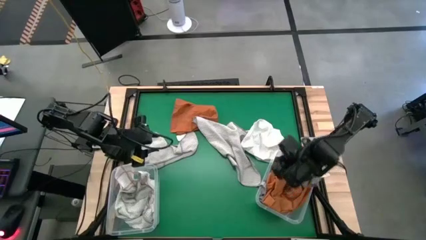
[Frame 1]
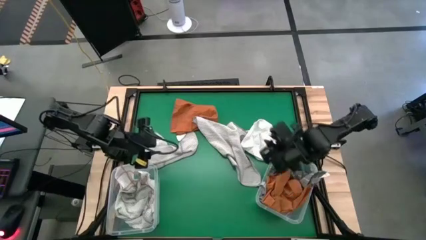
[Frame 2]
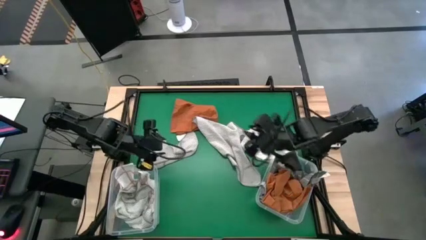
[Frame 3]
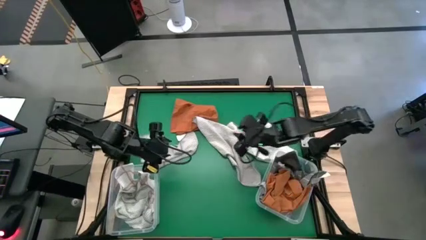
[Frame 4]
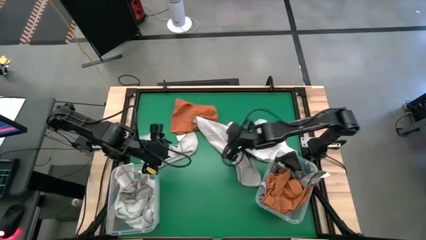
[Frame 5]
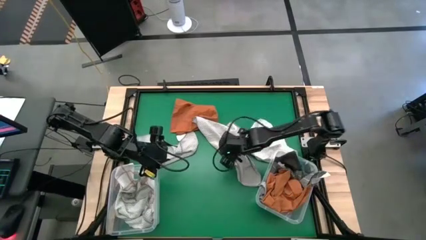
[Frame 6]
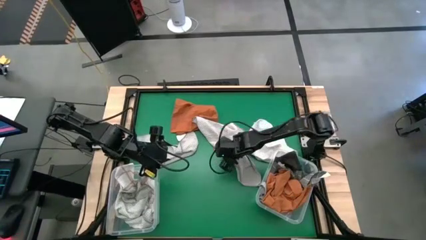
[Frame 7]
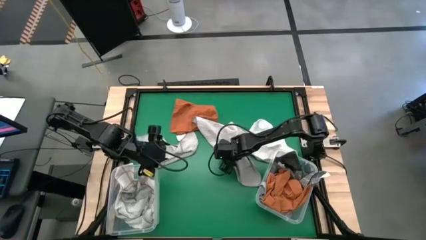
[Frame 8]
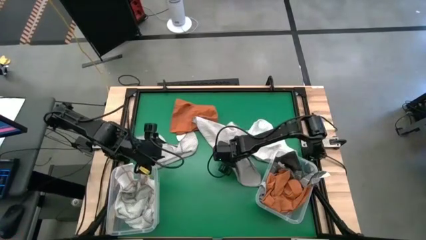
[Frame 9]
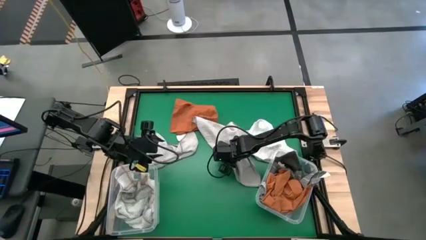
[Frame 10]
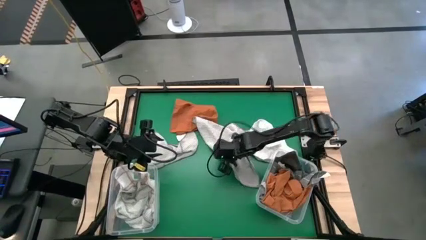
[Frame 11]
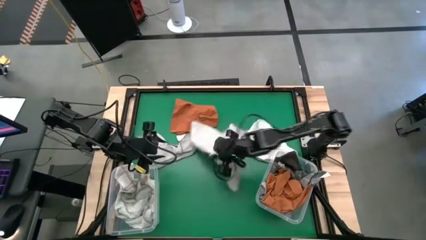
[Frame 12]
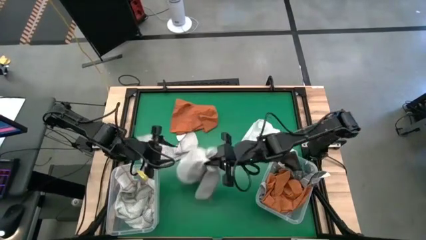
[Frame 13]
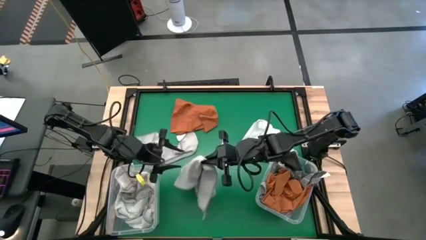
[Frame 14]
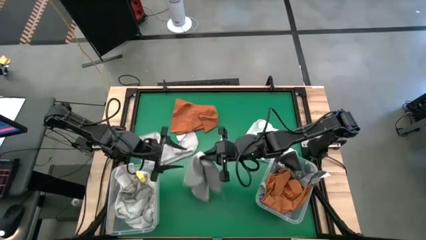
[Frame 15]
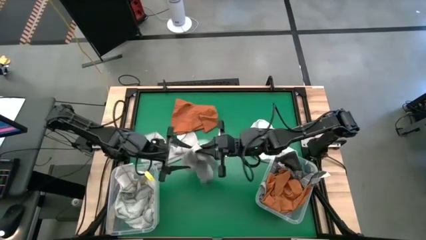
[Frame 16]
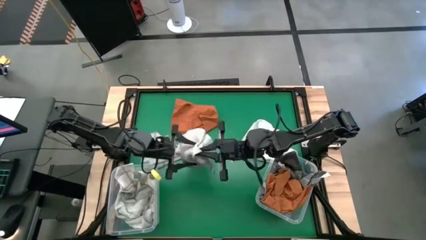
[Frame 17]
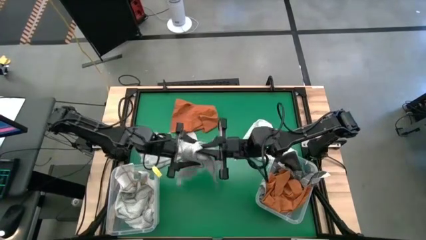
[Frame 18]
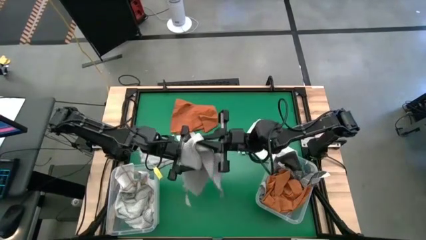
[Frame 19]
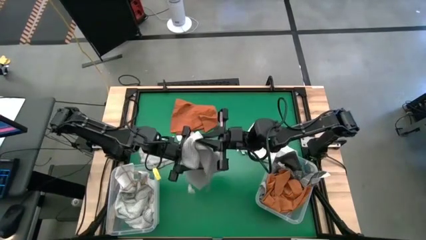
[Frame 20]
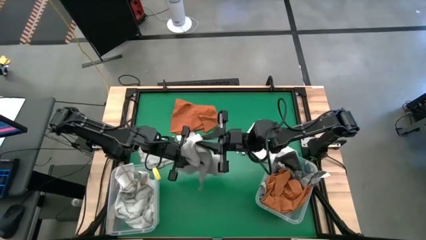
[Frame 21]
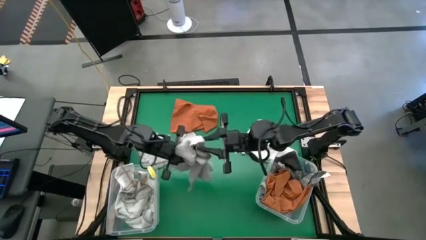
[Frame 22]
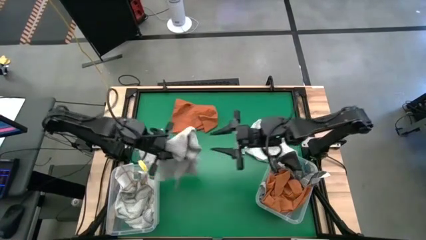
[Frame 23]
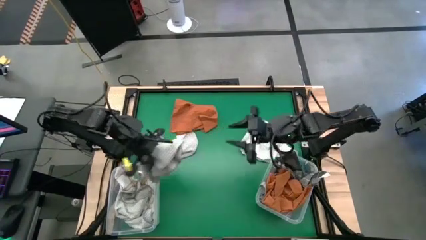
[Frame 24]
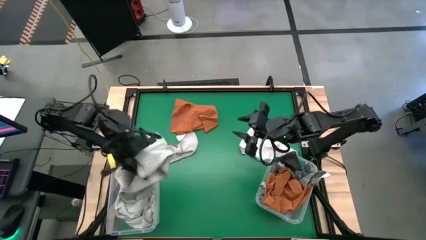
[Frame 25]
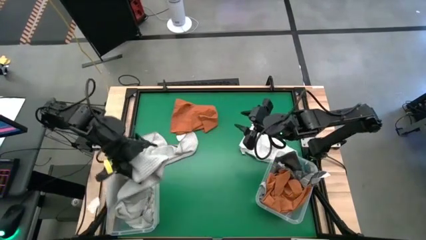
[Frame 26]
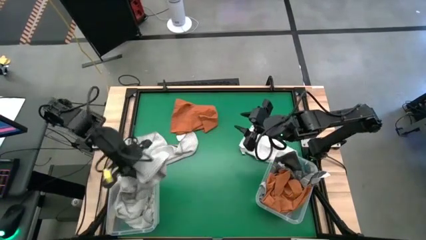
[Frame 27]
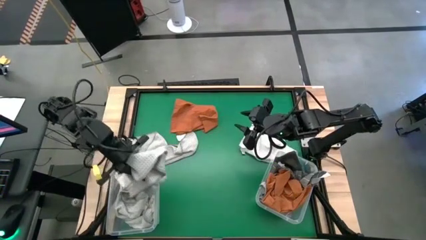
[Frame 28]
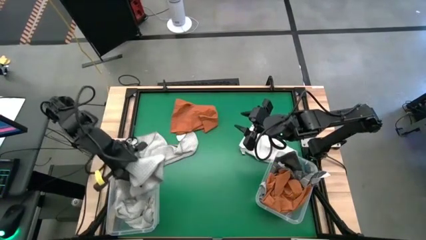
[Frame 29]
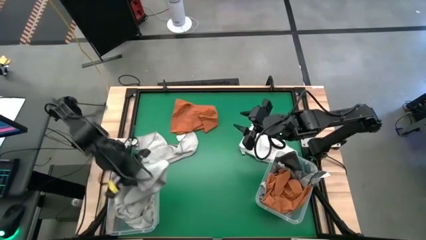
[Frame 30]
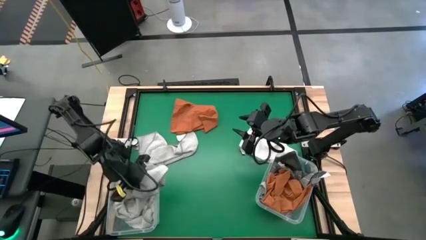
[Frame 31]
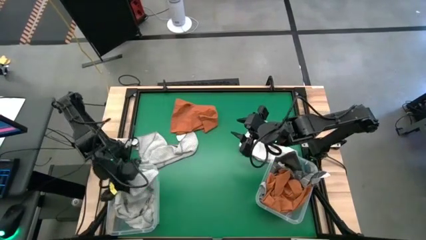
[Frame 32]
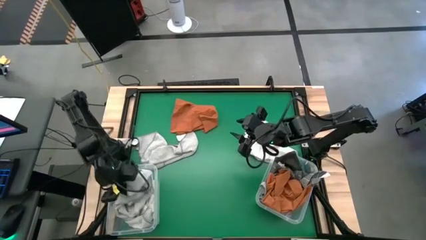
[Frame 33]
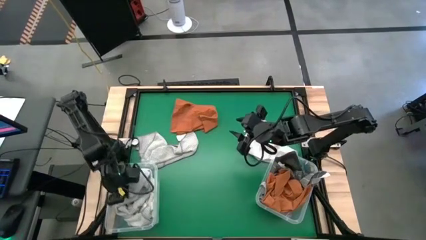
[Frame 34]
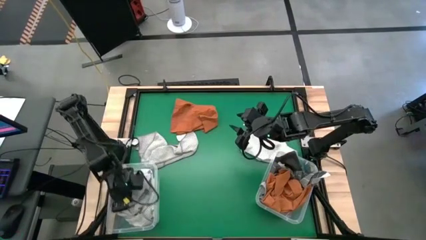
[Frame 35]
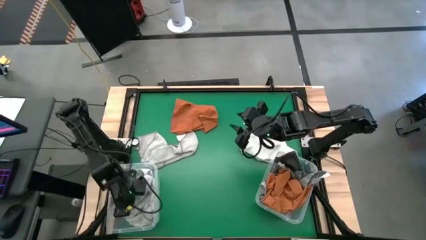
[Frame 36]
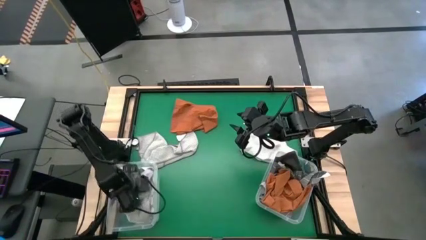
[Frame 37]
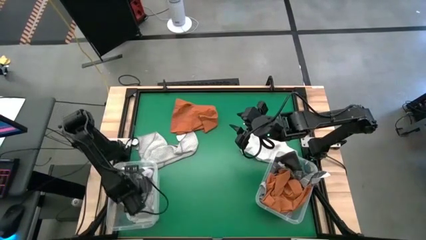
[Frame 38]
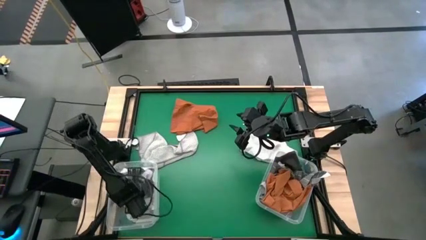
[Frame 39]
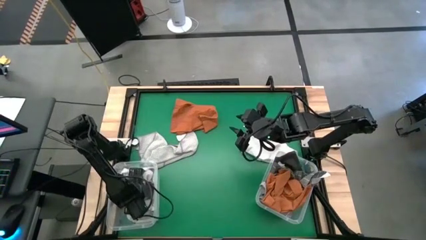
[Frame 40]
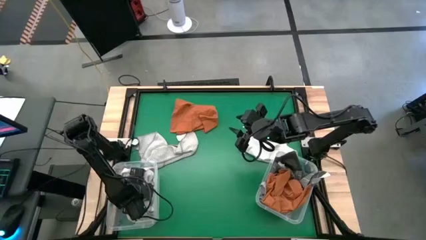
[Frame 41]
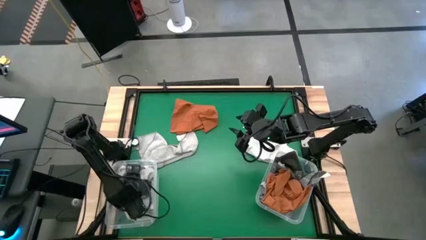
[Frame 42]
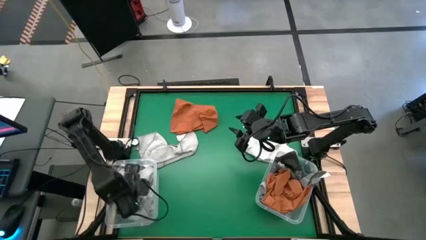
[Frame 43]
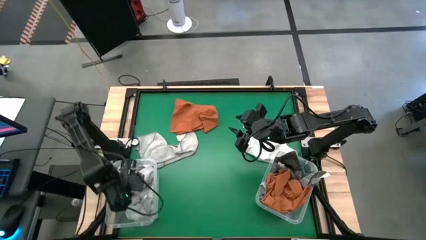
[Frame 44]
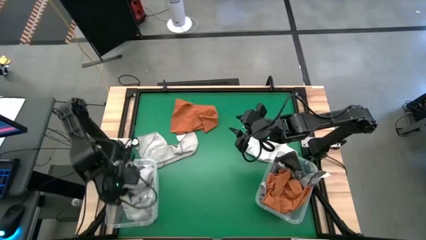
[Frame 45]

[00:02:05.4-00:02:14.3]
Task: Sort towels by color in basket
Put the gray towel into the left transparent bin

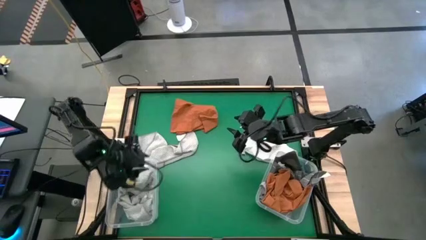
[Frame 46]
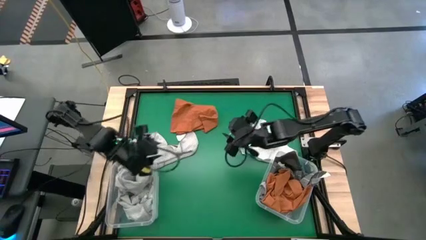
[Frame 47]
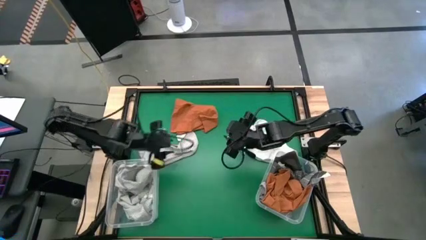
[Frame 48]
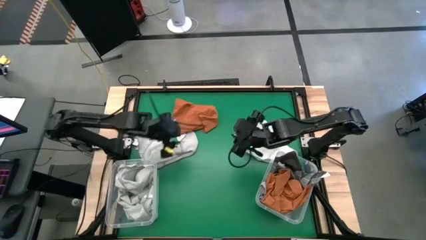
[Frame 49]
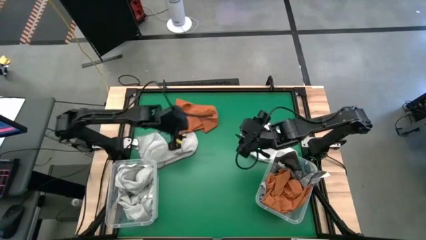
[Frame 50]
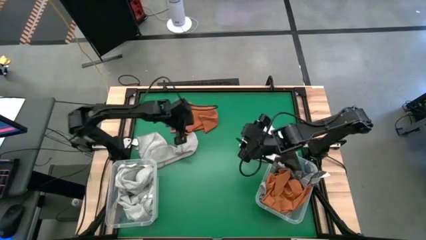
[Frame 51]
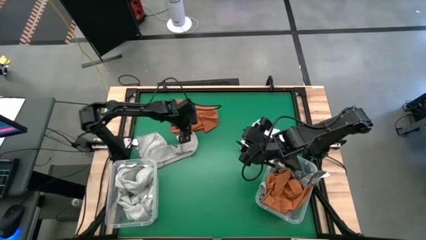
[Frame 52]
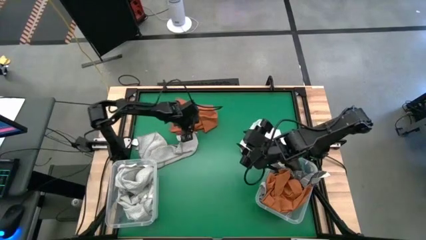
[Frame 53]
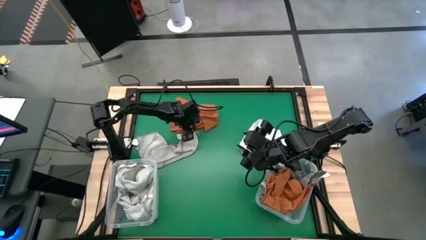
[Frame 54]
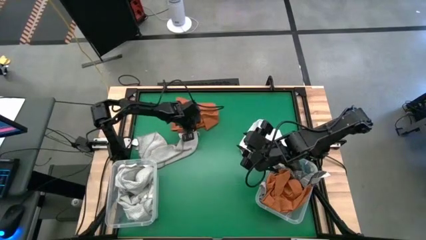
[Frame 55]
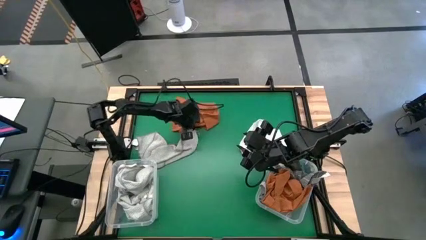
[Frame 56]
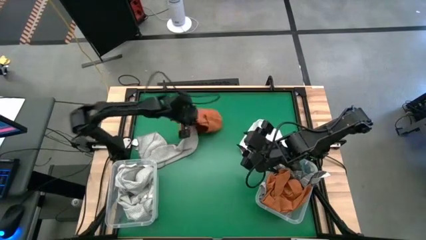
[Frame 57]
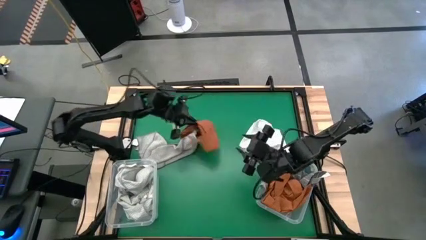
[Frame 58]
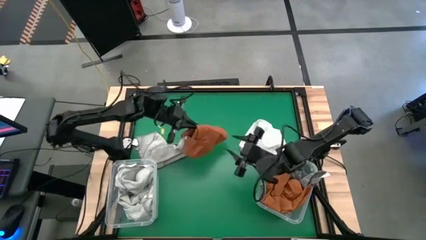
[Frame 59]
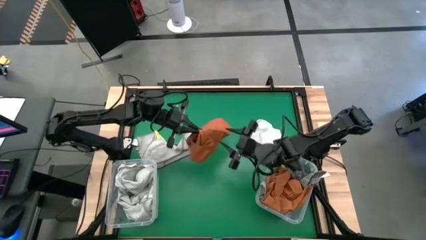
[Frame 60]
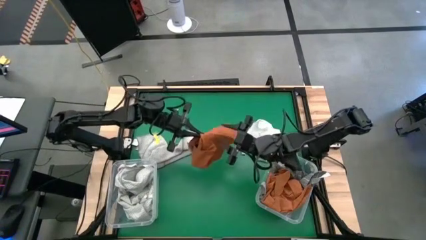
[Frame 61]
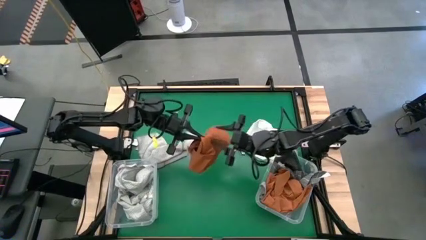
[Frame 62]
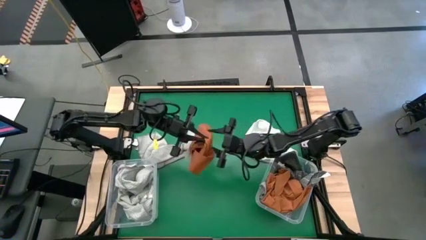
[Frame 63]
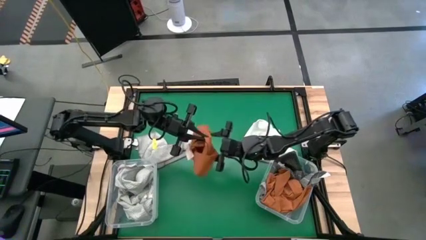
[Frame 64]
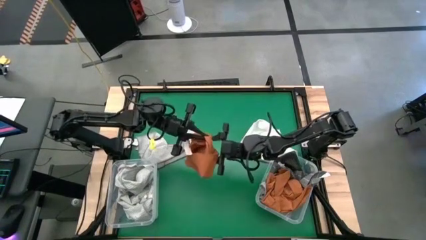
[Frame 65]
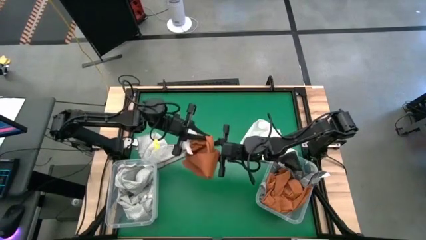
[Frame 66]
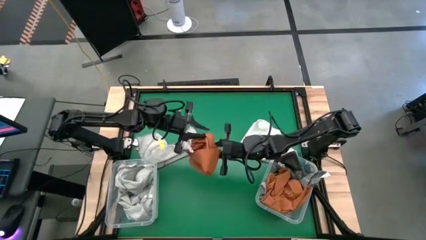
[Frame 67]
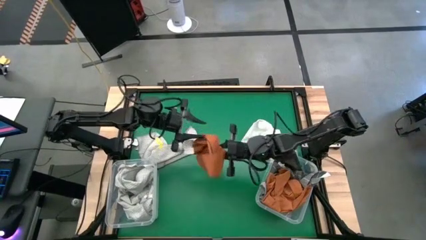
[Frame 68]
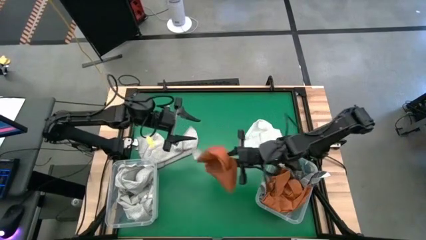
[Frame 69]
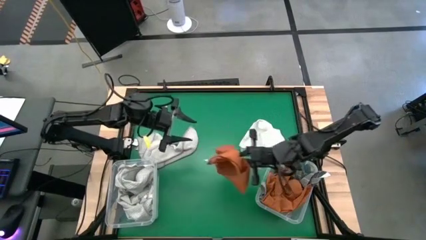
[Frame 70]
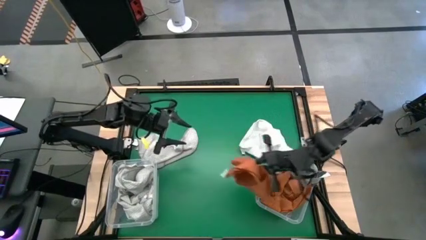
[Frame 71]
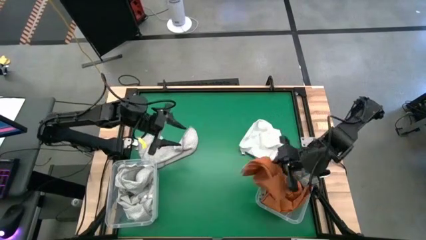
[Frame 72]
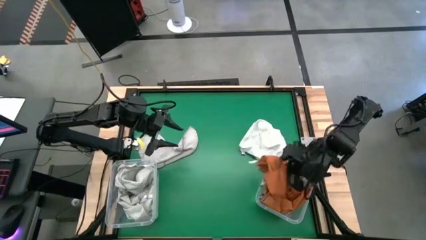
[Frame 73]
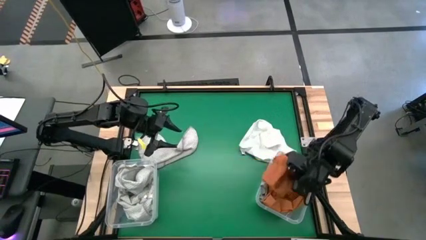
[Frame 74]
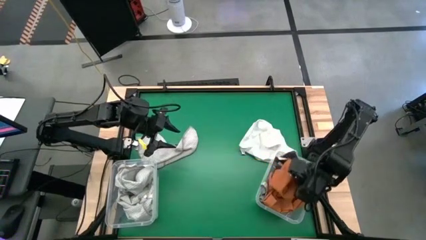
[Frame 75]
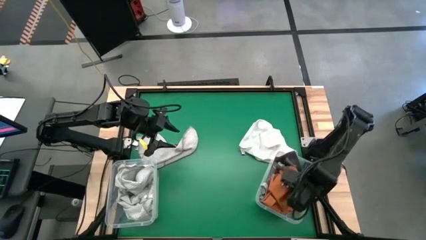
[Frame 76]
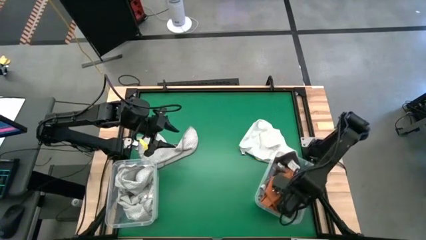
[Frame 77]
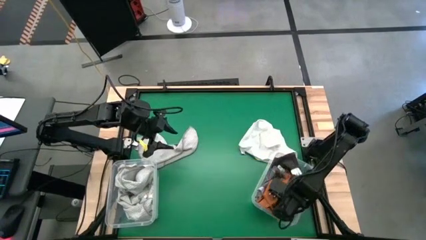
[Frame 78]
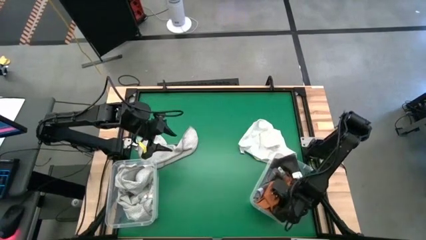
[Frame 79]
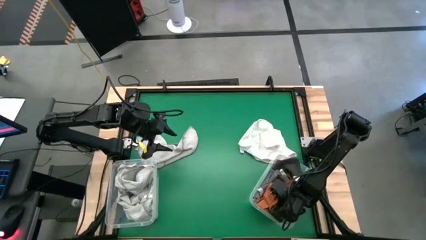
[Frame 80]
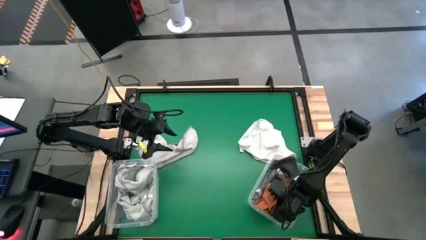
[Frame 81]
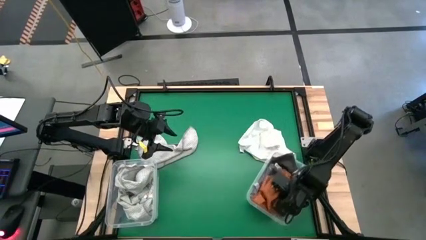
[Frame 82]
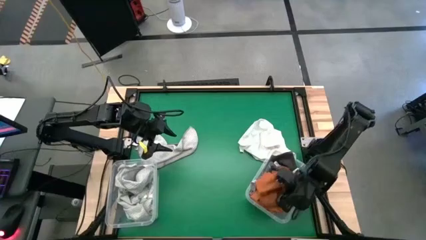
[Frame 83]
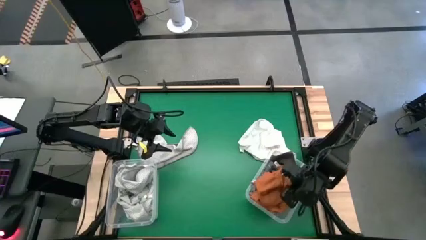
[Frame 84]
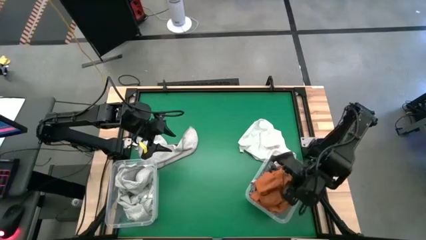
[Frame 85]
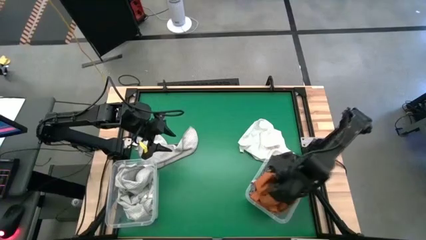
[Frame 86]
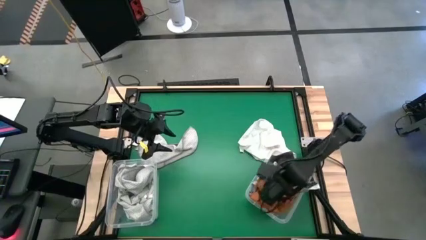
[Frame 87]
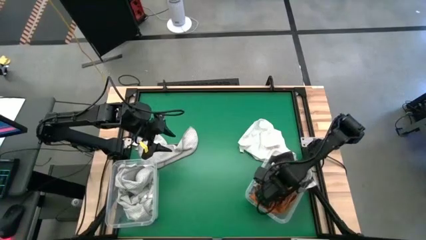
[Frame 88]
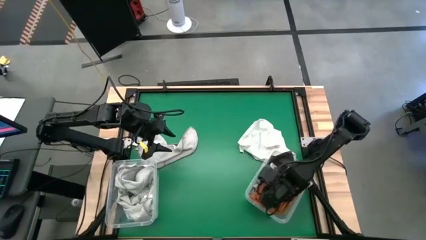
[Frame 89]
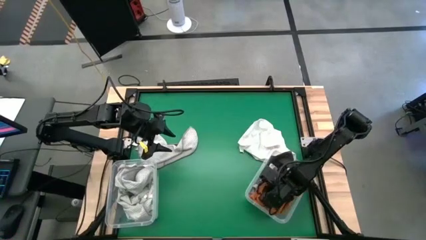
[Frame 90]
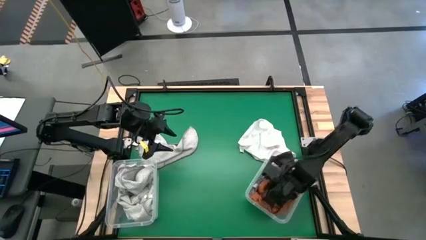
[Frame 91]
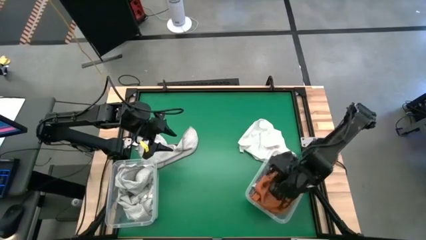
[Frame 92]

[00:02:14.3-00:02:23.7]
Put the brown towel into the right transparent bin
